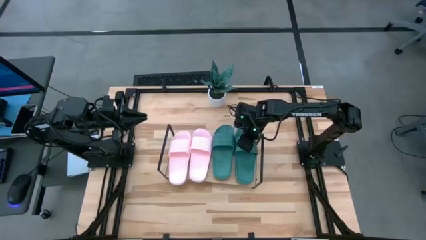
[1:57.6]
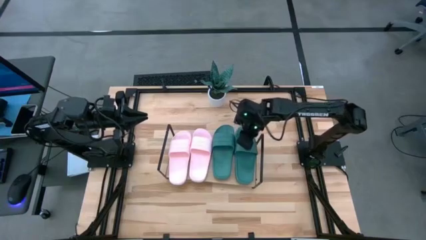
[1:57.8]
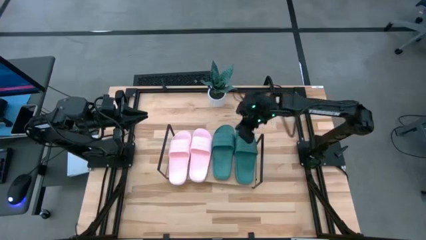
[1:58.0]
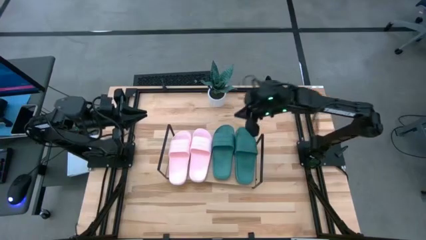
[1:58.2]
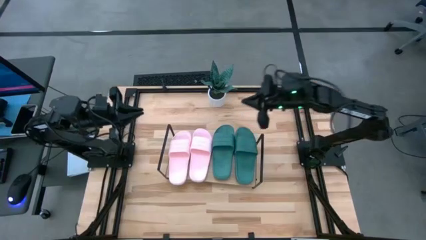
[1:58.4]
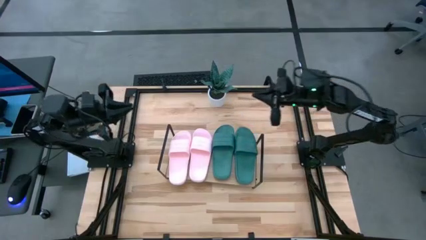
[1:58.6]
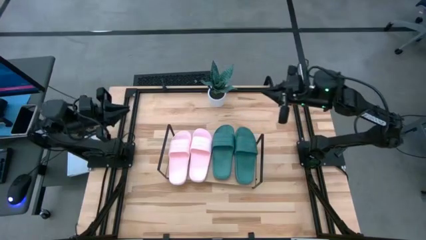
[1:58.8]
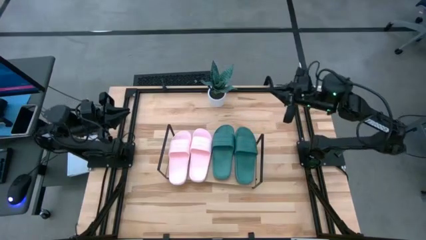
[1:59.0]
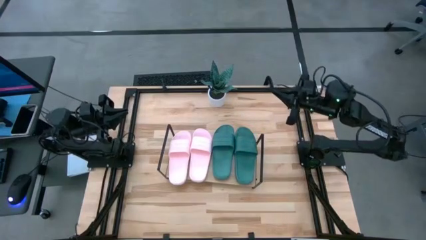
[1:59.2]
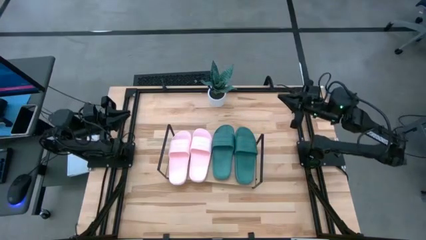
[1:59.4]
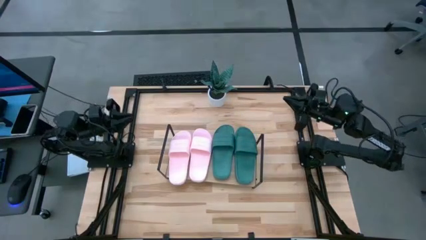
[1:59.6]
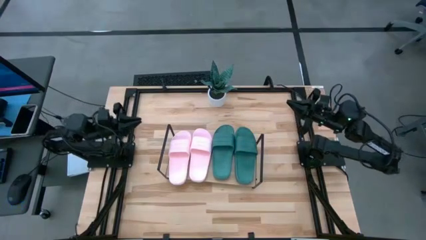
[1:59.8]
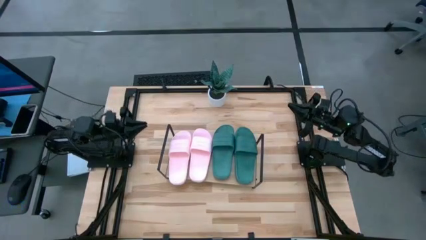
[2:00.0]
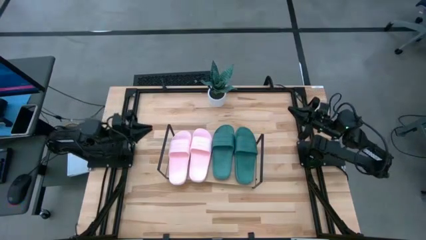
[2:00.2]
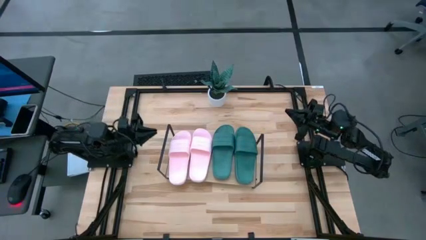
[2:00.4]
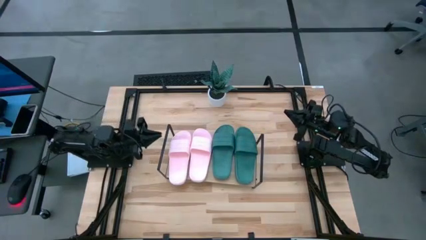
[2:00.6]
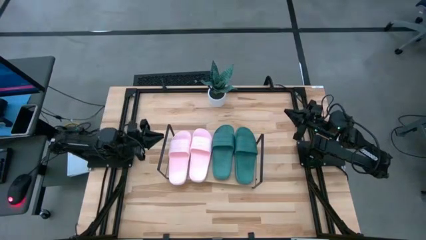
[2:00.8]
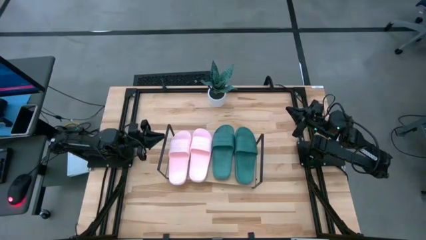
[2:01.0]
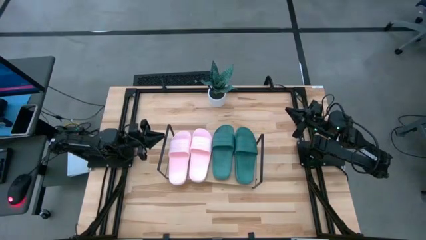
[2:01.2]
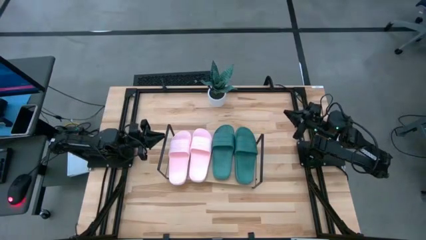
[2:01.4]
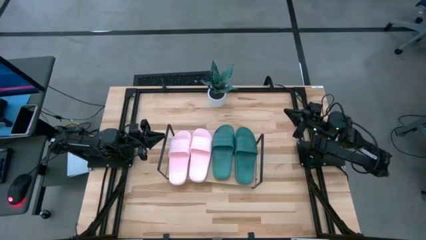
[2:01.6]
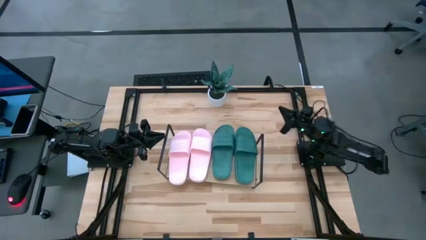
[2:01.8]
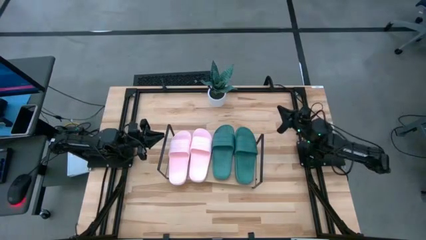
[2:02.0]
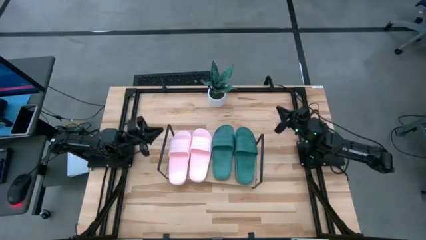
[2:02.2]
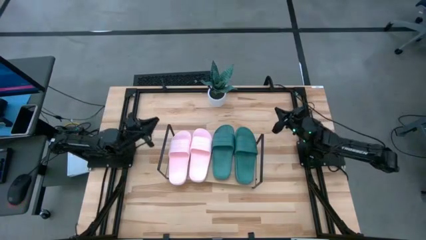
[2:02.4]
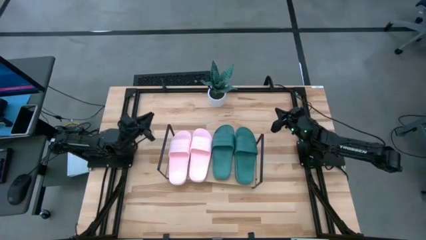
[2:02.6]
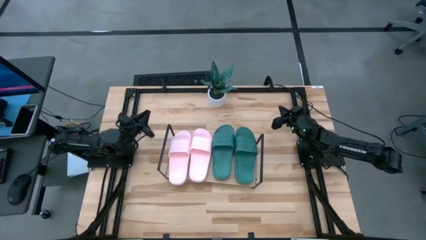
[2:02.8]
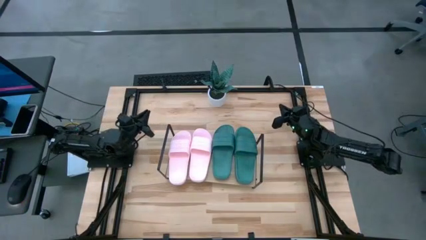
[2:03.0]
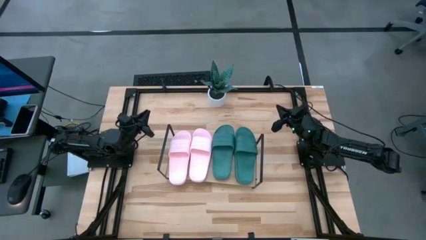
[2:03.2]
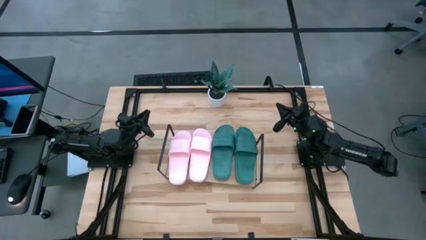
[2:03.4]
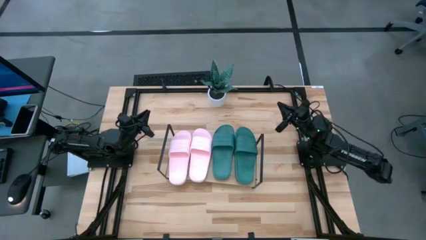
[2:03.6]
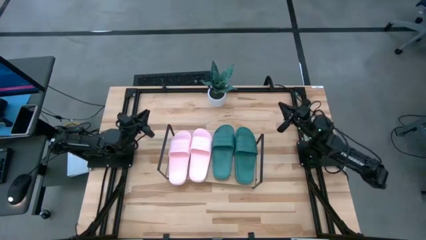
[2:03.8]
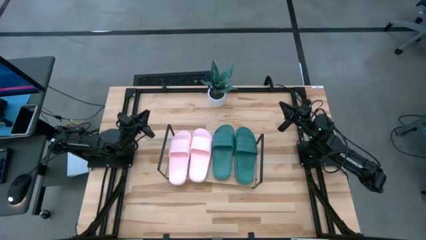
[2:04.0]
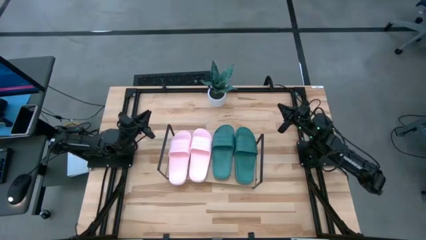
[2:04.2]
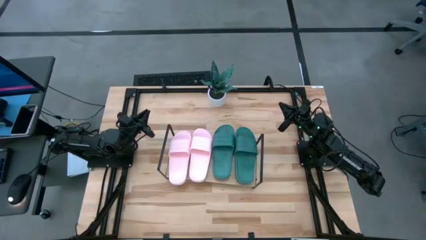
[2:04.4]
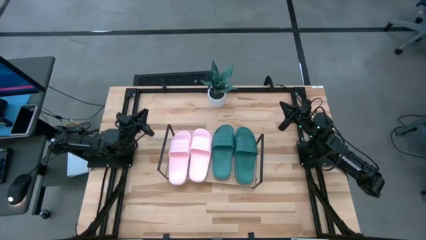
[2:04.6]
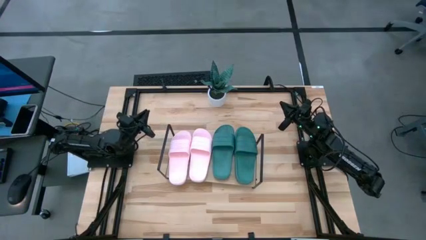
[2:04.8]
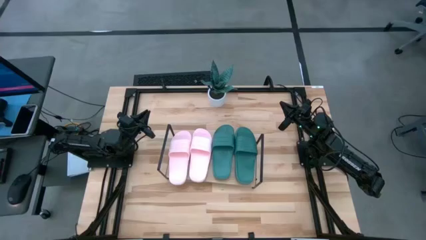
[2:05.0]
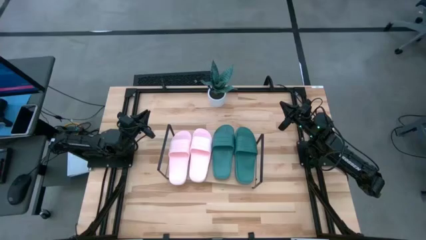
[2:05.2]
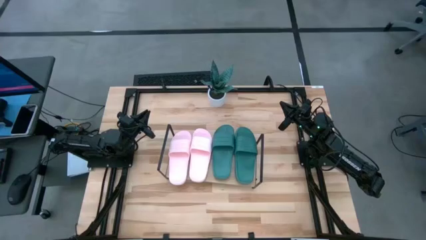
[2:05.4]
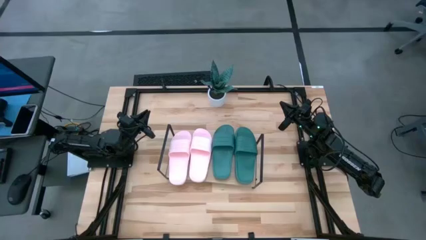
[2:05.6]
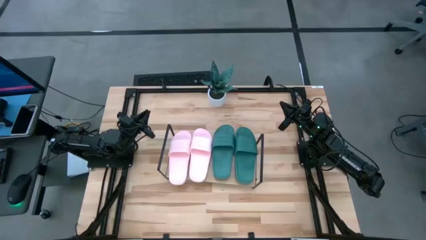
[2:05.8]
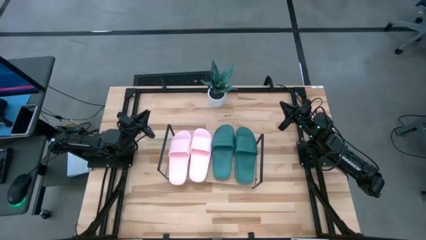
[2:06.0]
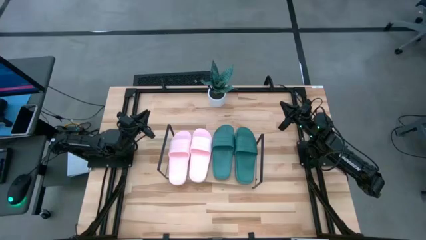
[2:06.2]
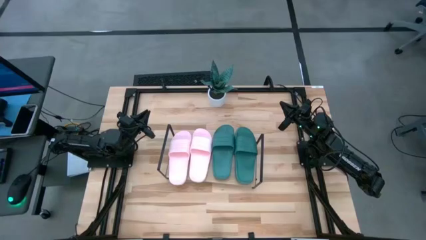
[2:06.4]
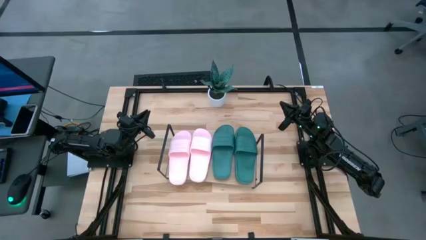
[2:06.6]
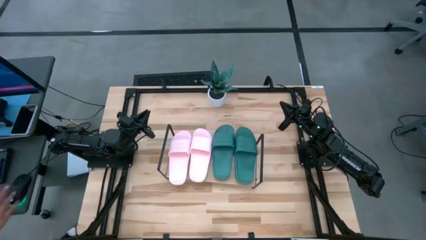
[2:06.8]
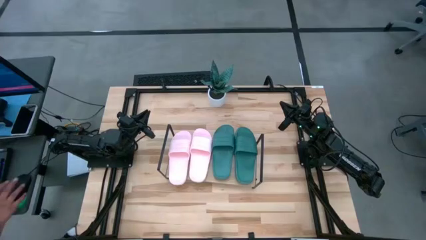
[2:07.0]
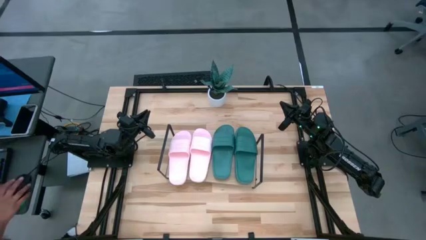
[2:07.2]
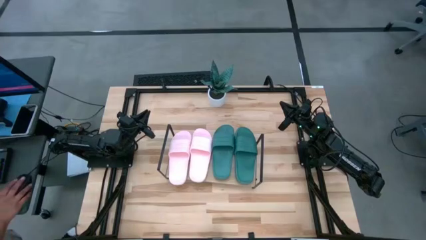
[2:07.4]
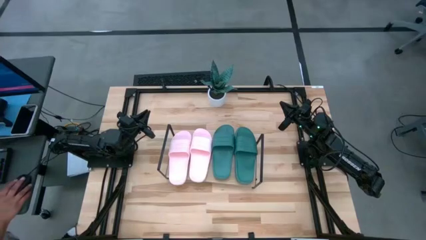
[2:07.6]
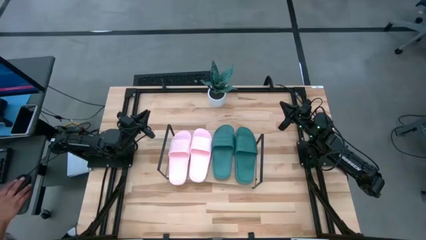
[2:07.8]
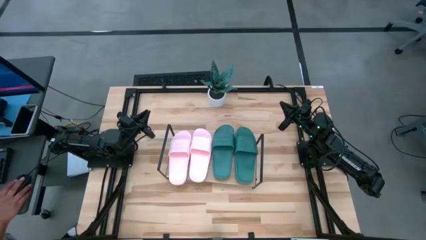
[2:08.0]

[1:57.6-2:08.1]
Task: Pick and place slides into the shelf
Return to Home Position
